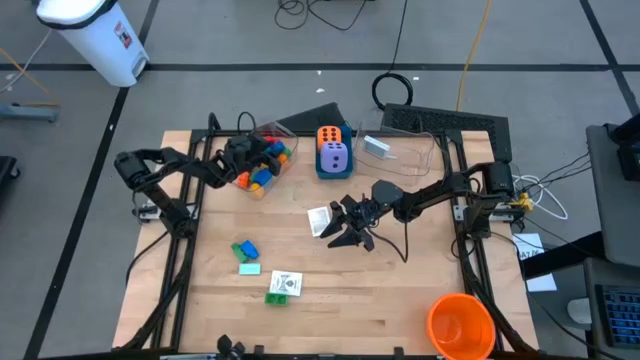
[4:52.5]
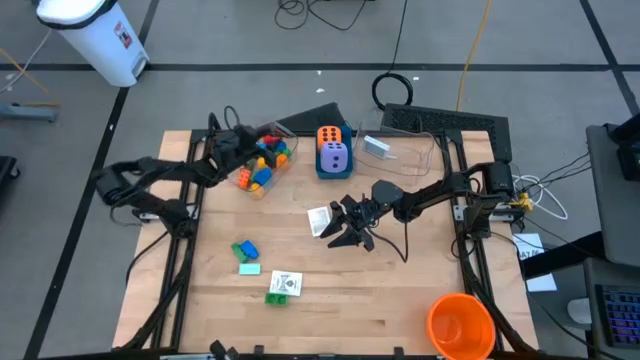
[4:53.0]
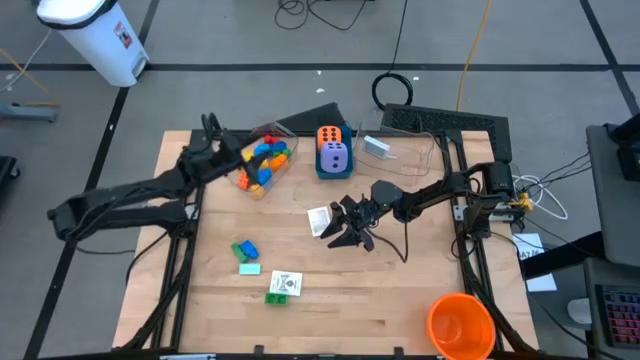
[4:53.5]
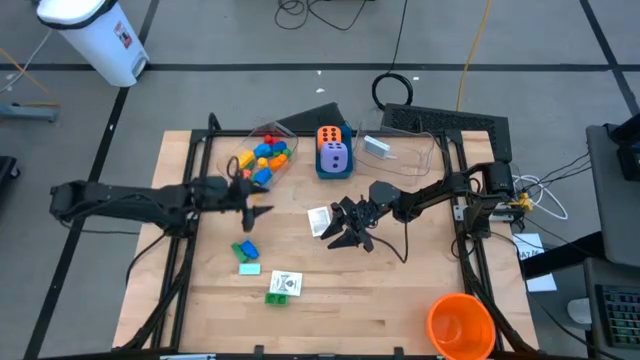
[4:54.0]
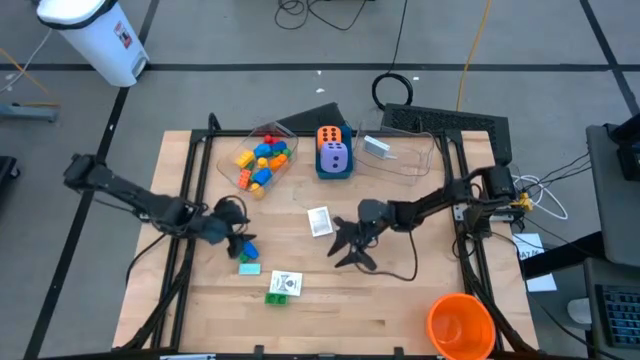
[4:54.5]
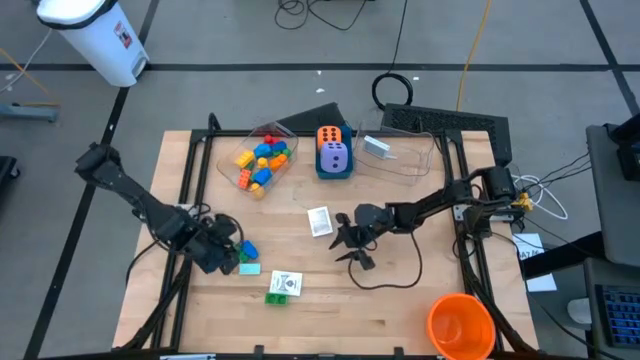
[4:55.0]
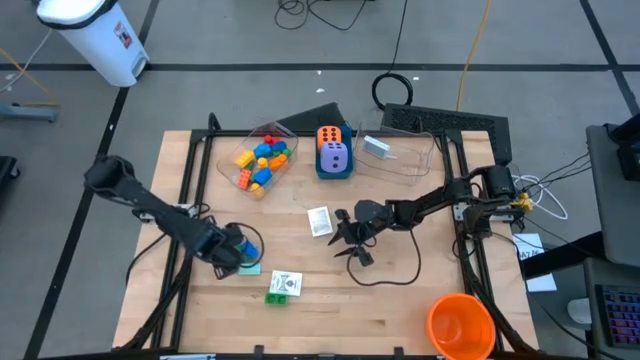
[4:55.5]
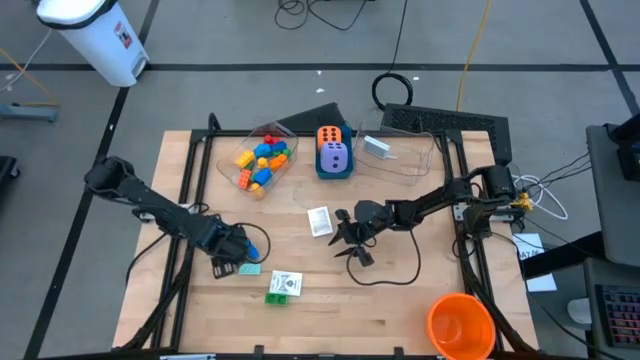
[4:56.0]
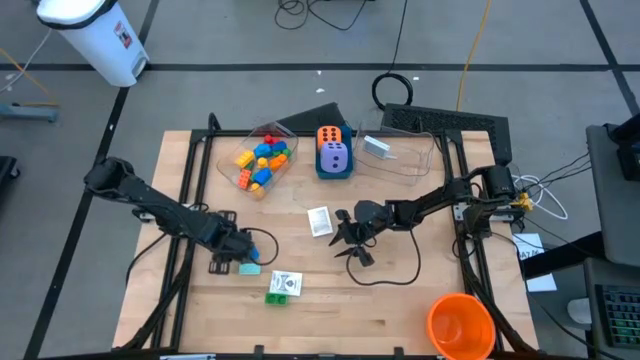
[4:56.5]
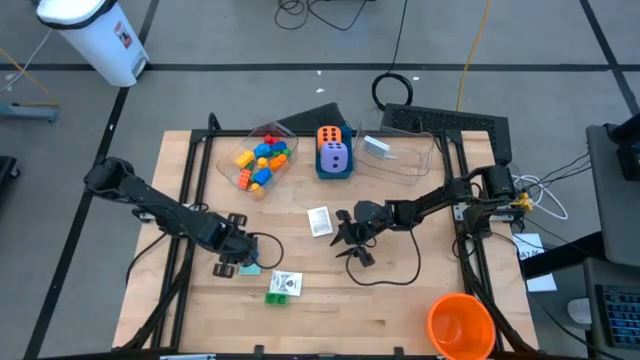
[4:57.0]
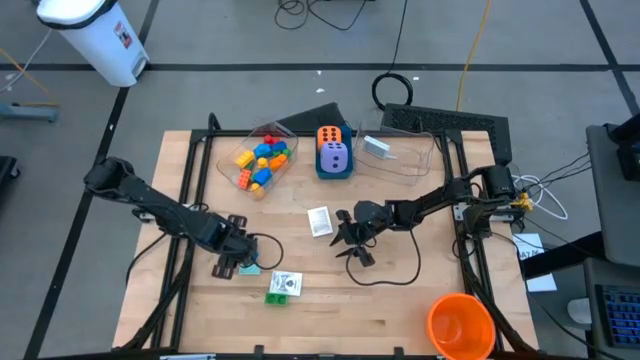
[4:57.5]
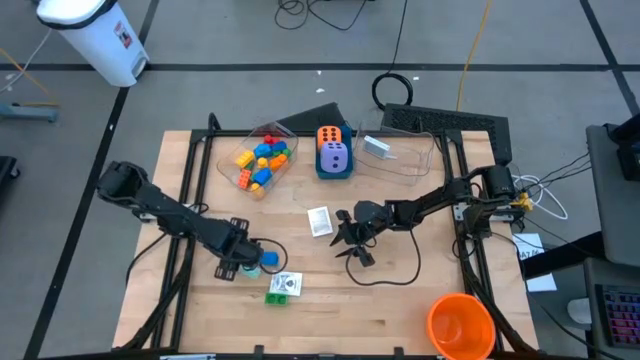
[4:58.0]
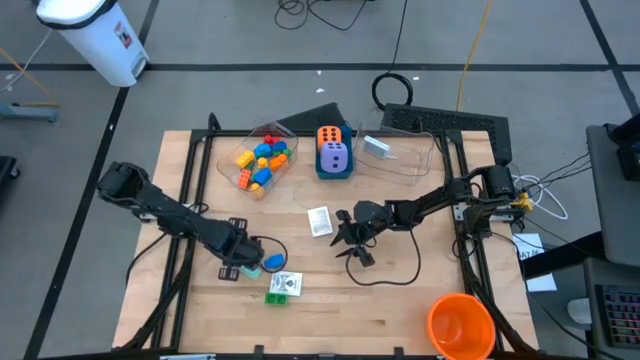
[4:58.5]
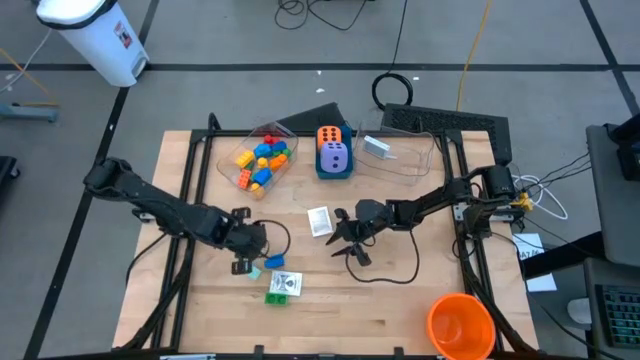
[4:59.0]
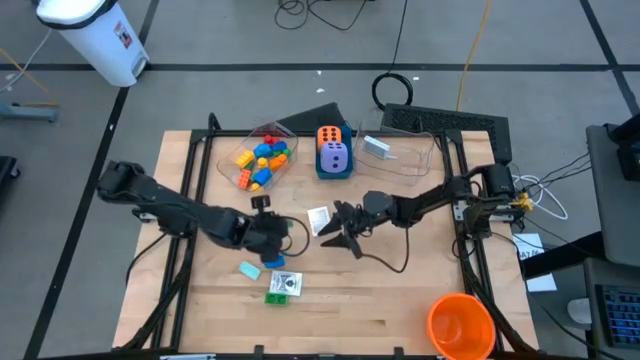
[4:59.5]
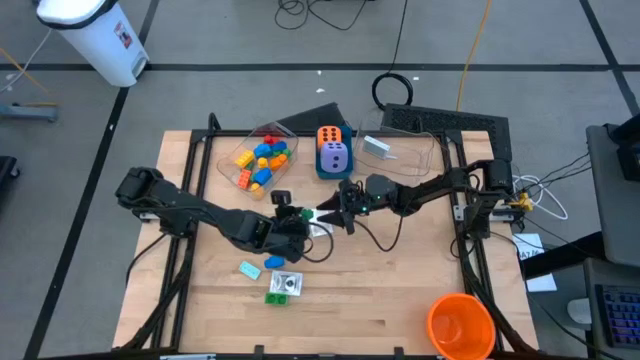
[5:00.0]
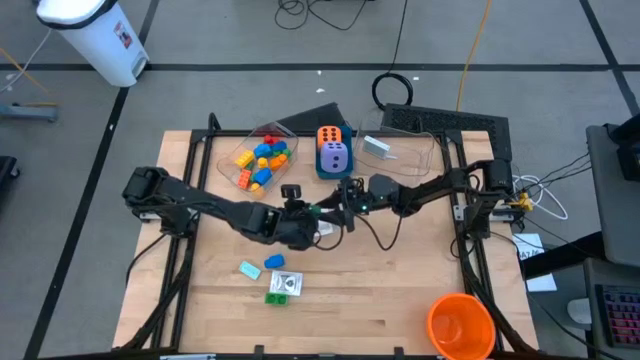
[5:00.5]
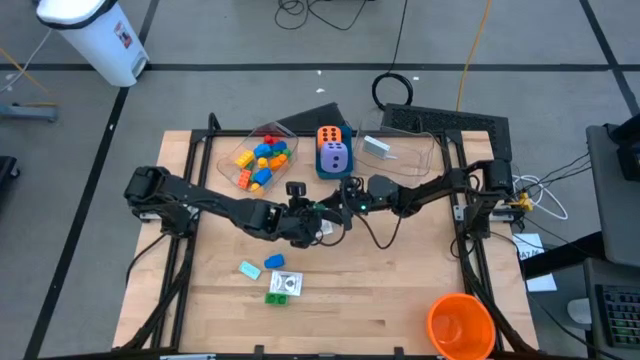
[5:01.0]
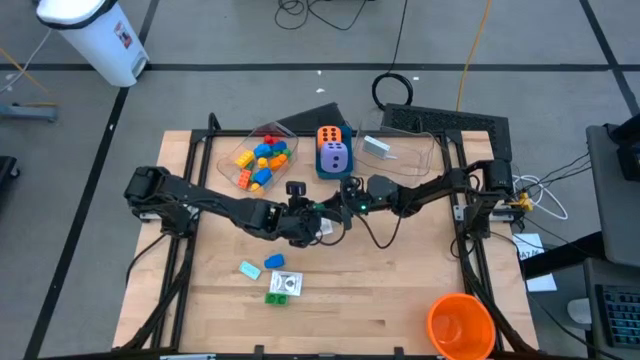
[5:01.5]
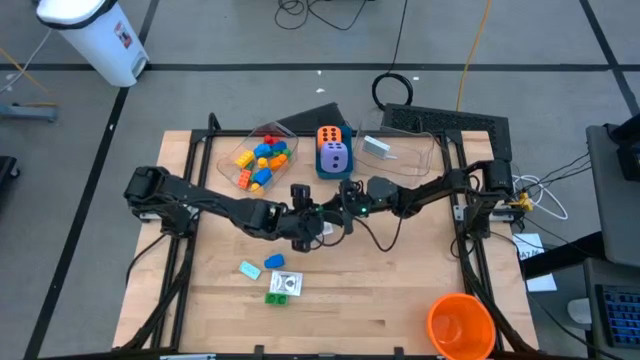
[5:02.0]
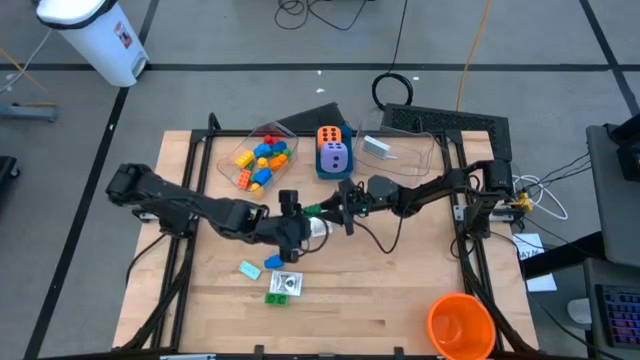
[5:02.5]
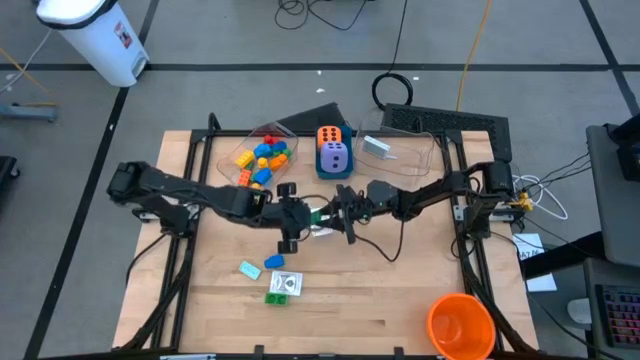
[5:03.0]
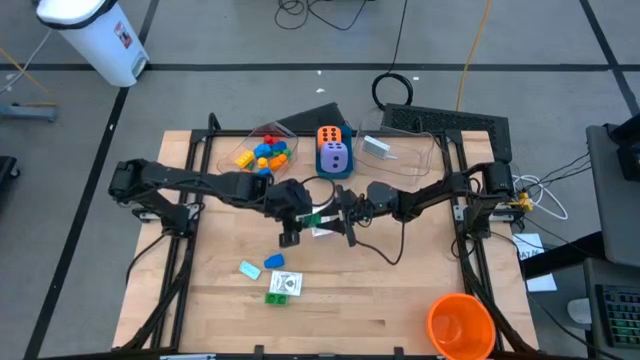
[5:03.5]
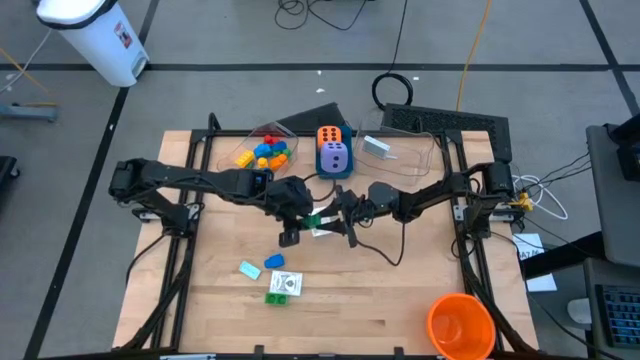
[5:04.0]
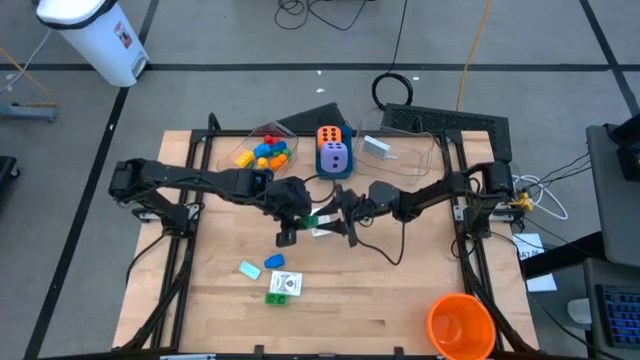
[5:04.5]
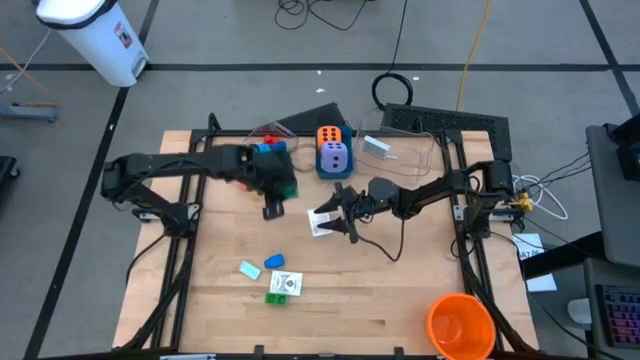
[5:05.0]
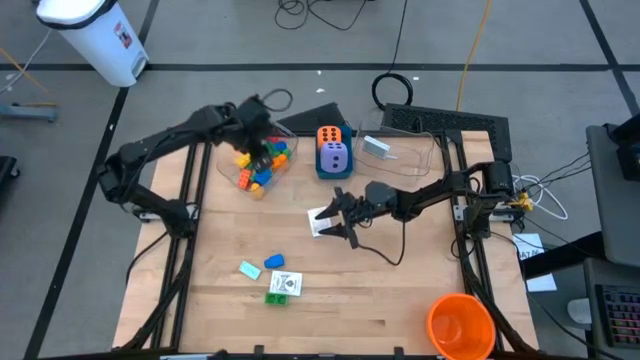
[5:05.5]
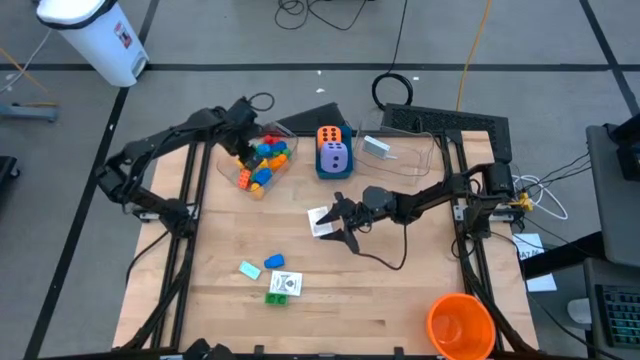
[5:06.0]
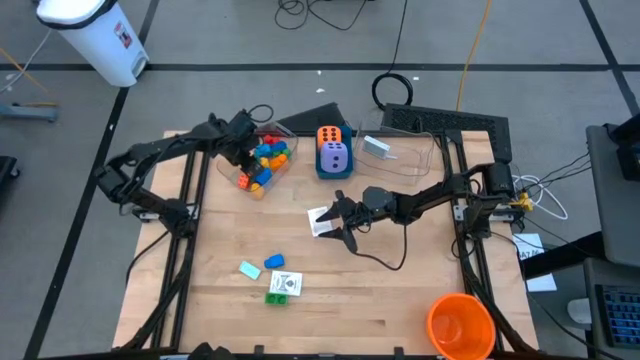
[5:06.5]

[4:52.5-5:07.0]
Task: Pick & Place Toys
Put the green game piece into the left transparent bin

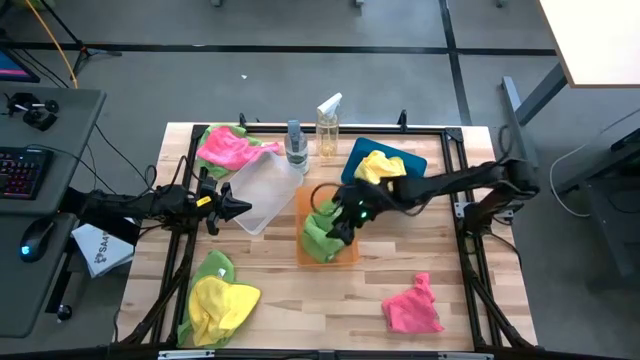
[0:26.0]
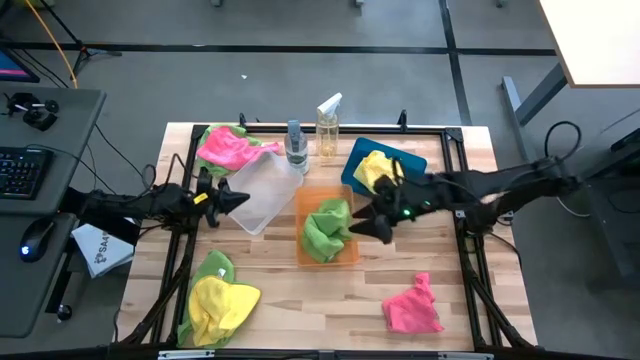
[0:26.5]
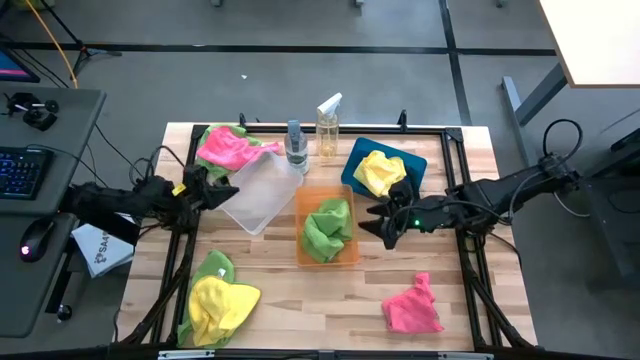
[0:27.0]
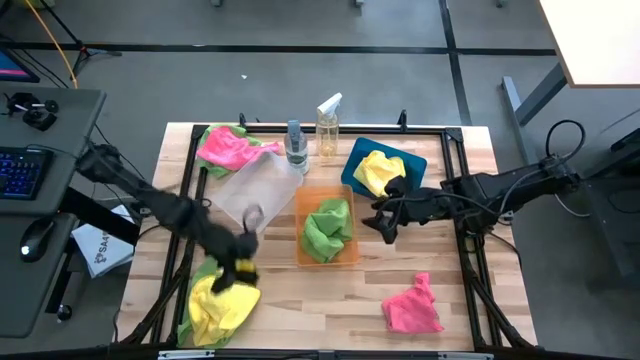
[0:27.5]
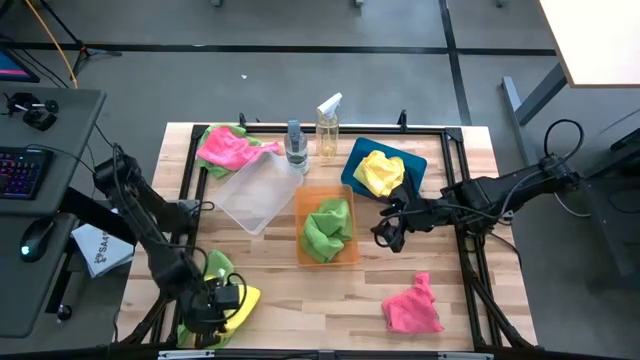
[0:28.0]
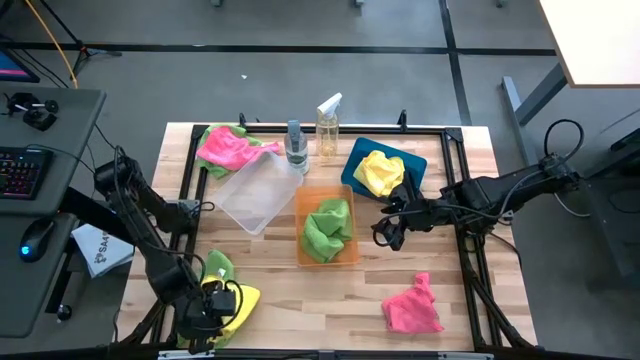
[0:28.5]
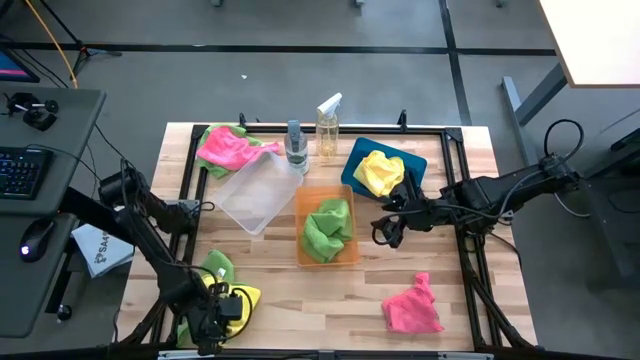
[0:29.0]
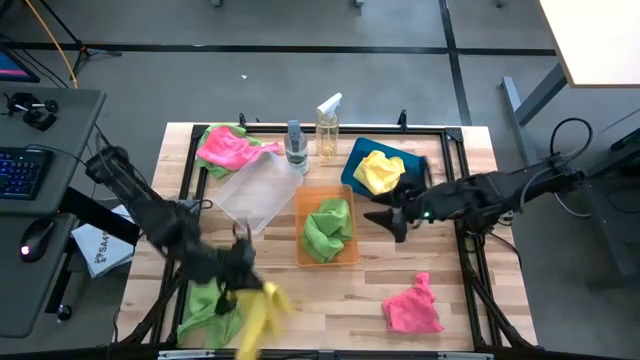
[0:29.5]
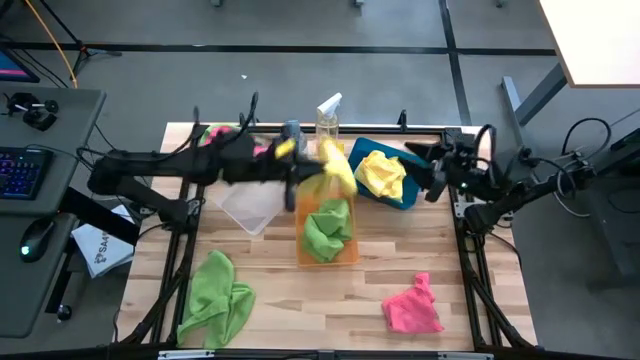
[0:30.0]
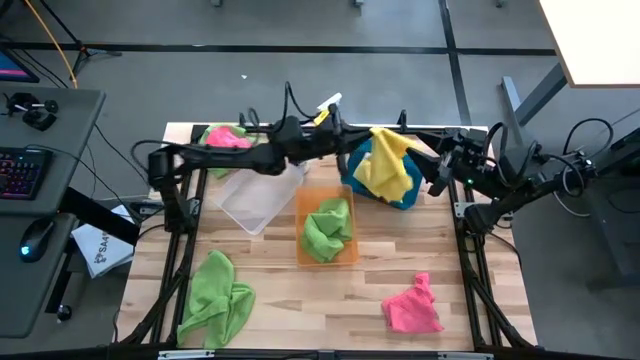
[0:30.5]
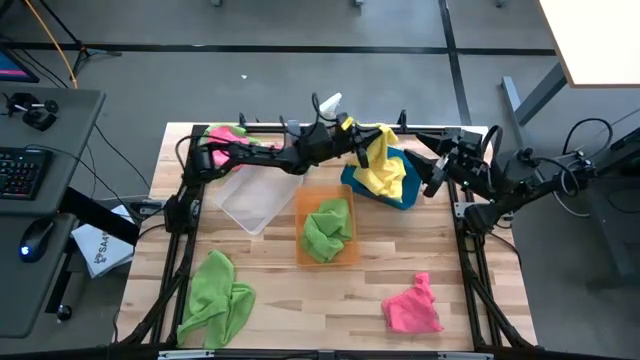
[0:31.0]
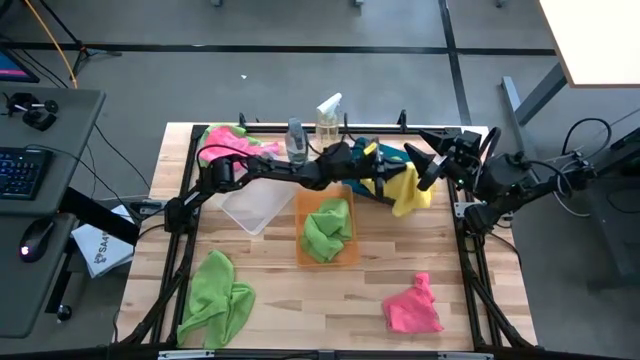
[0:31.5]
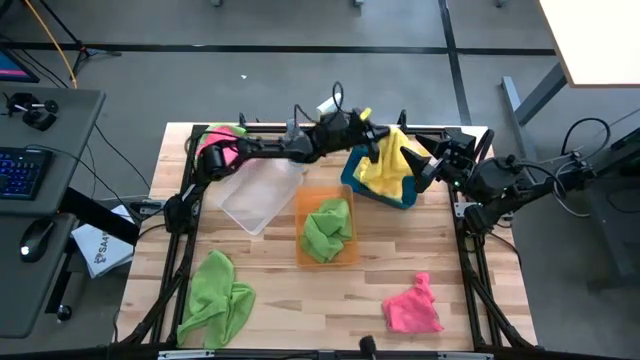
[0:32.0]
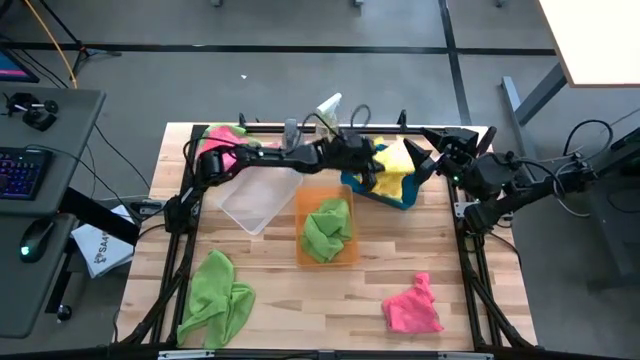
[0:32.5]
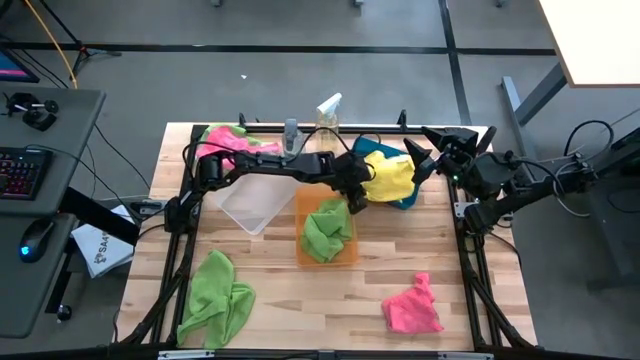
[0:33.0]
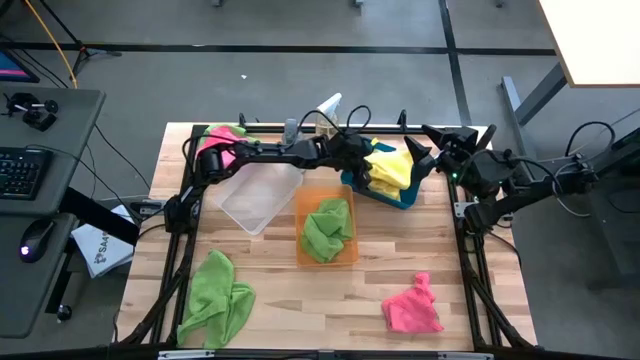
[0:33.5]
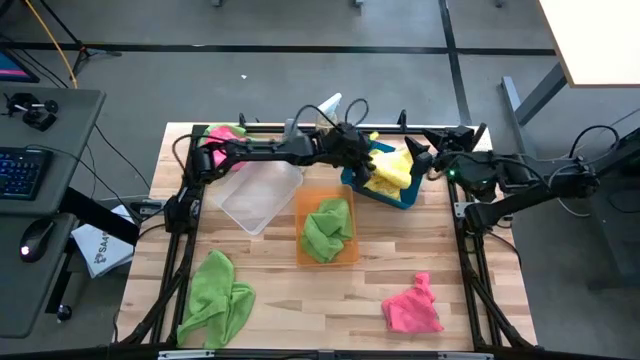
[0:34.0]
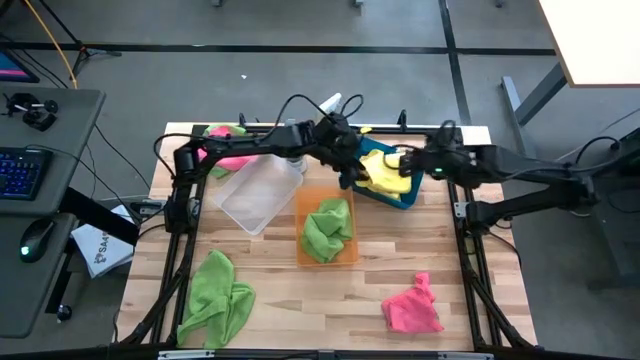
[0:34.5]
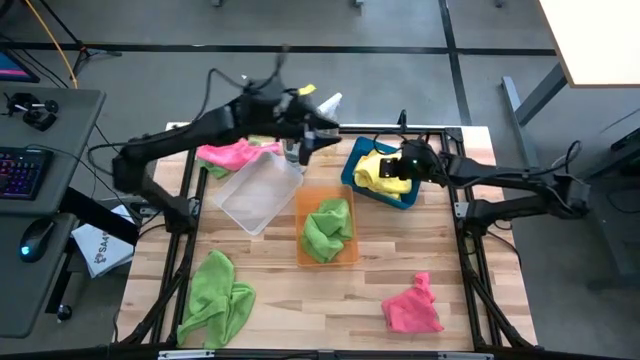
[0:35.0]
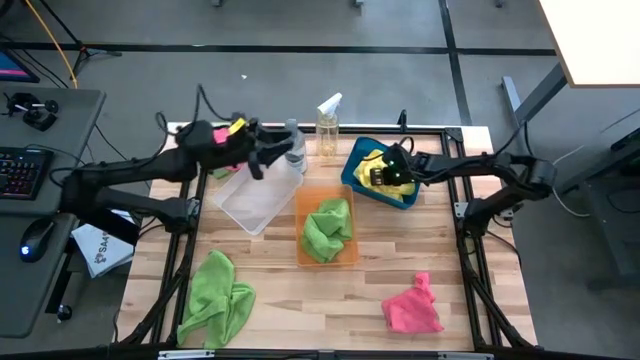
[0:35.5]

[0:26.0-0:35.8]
Task: Sort microfiber towel by color & place in baskets
Put the yellow microfiber towel into the blue bin
